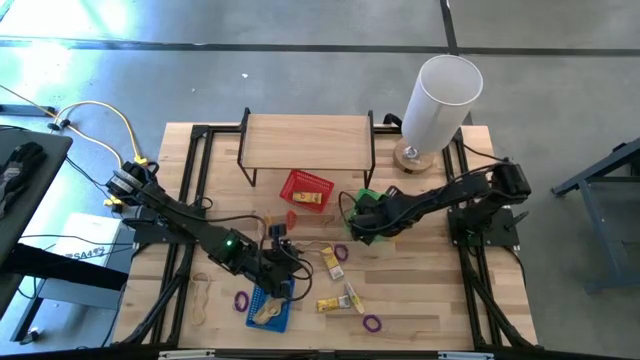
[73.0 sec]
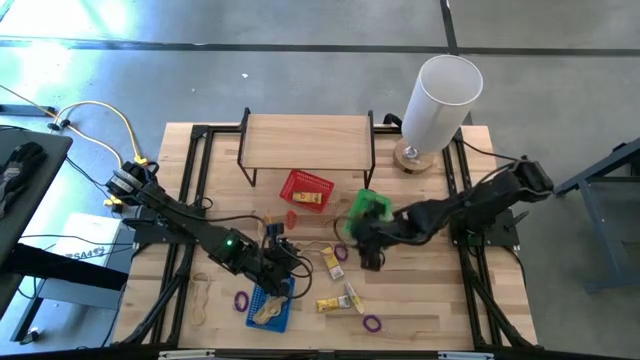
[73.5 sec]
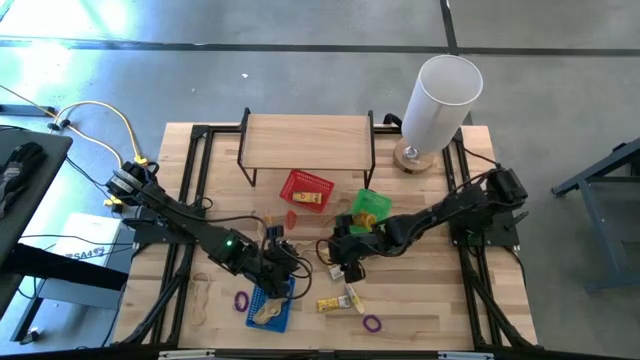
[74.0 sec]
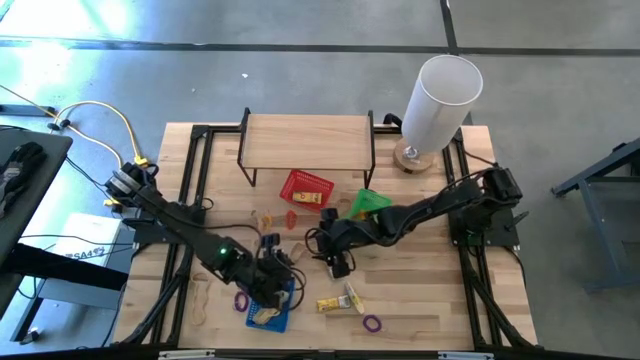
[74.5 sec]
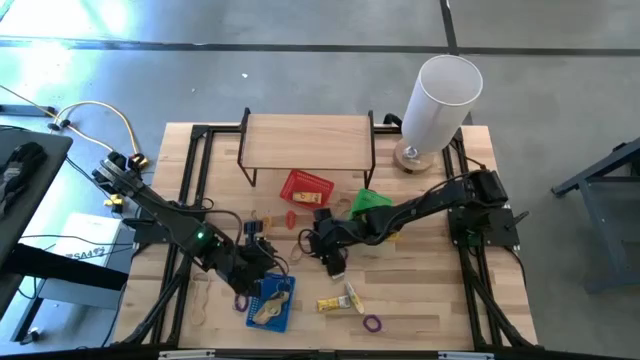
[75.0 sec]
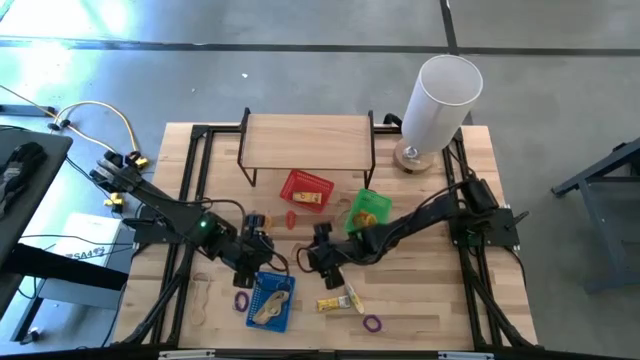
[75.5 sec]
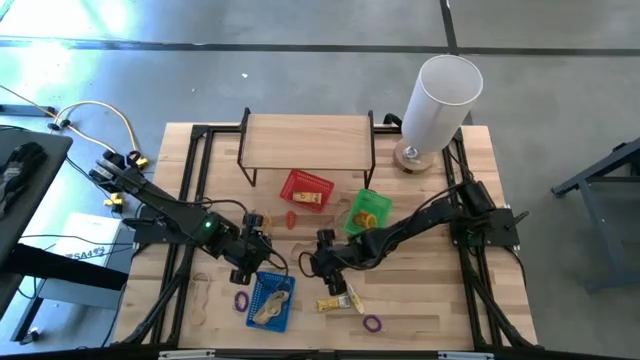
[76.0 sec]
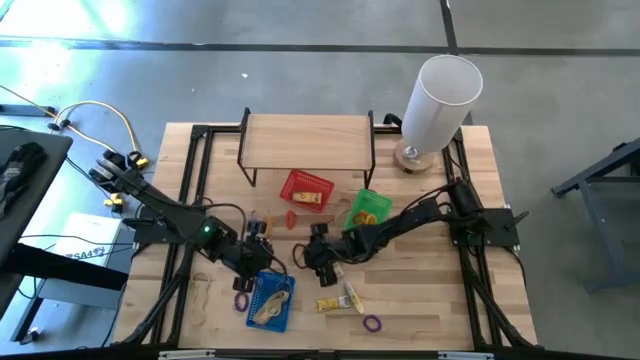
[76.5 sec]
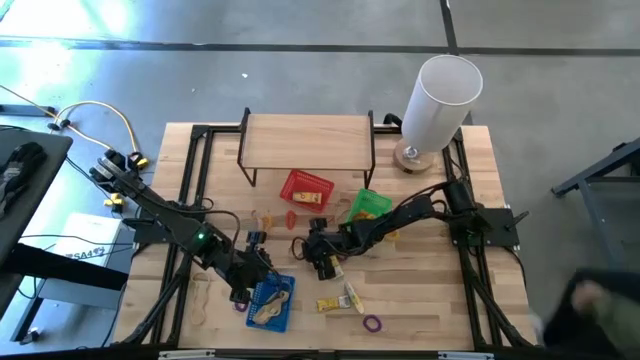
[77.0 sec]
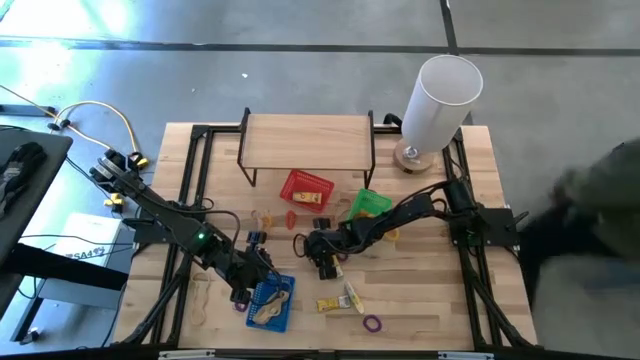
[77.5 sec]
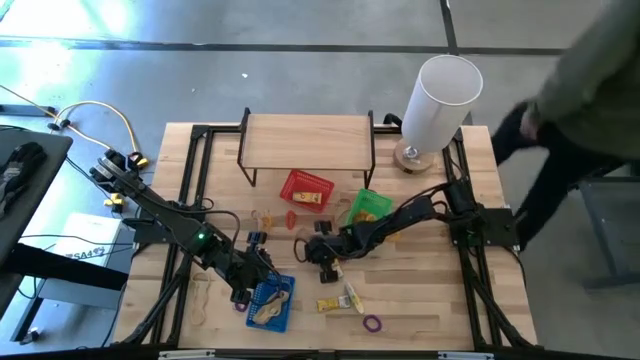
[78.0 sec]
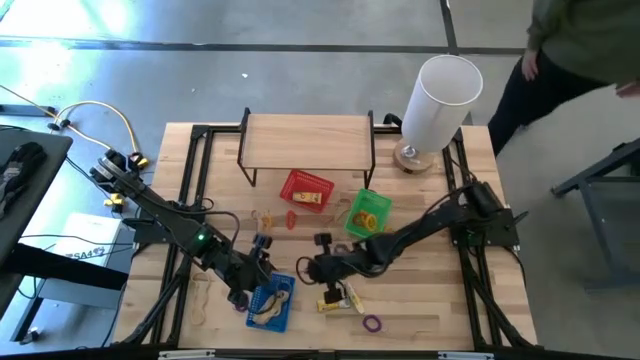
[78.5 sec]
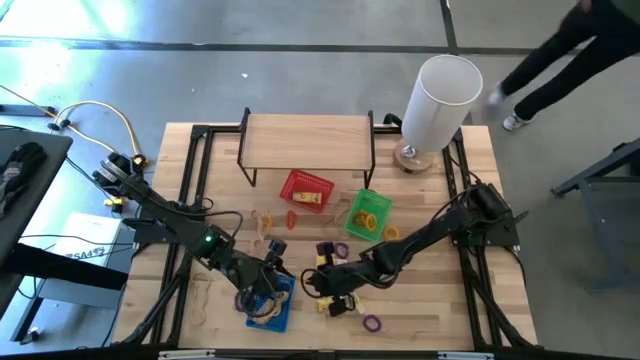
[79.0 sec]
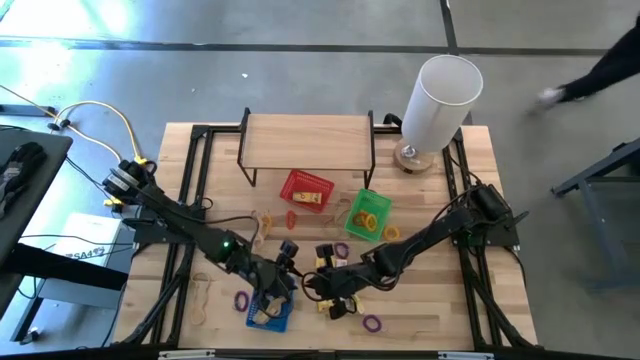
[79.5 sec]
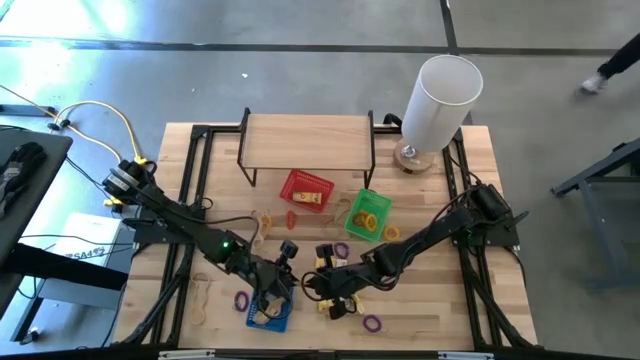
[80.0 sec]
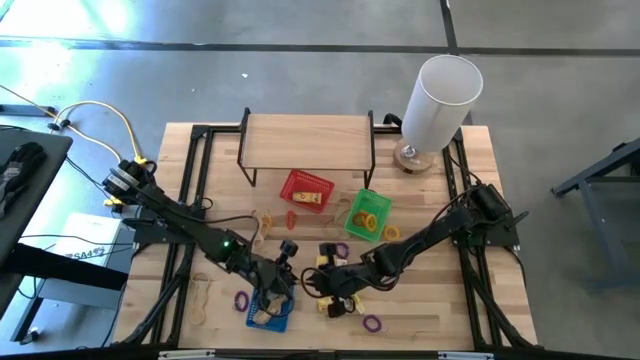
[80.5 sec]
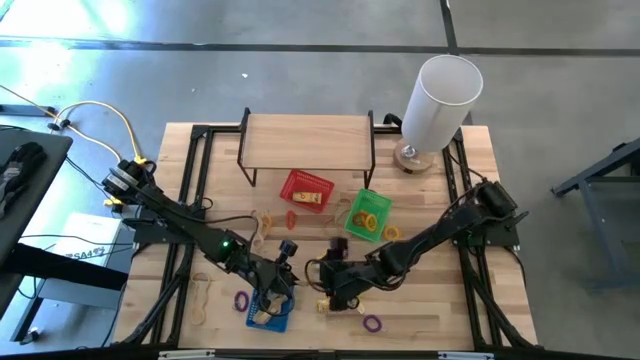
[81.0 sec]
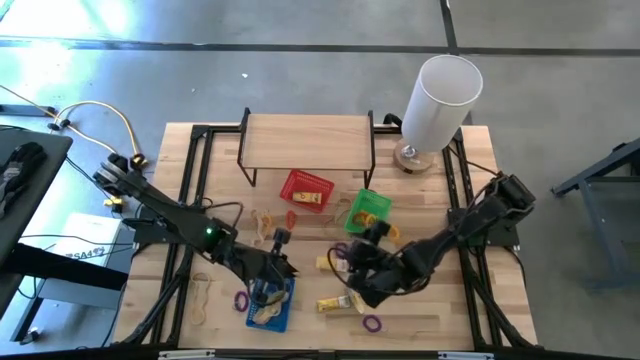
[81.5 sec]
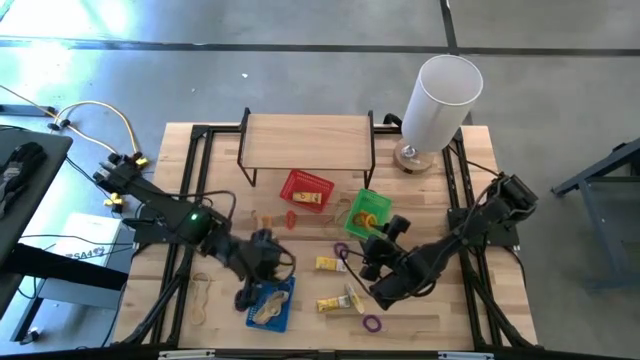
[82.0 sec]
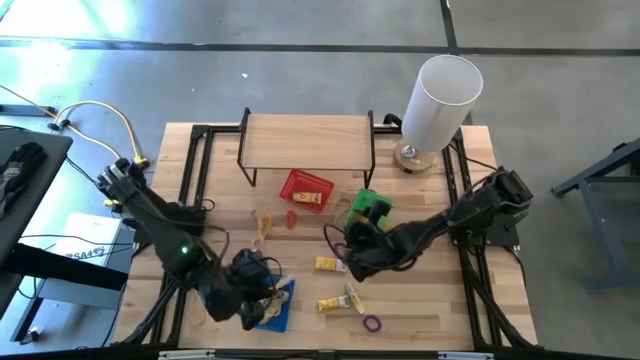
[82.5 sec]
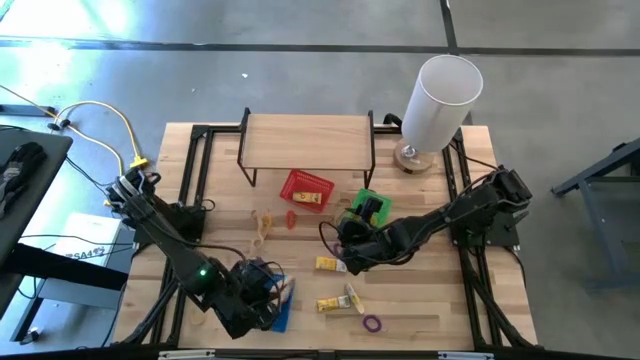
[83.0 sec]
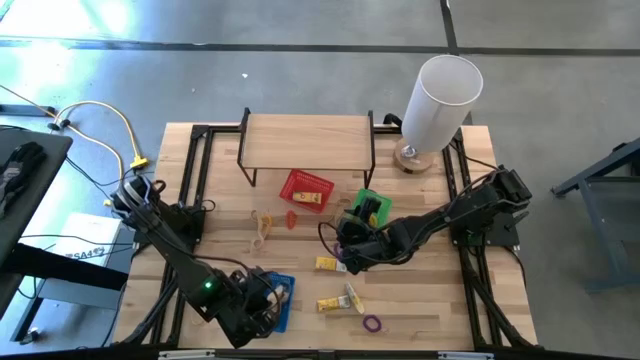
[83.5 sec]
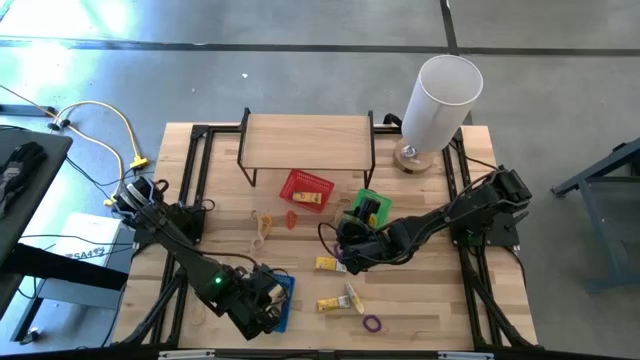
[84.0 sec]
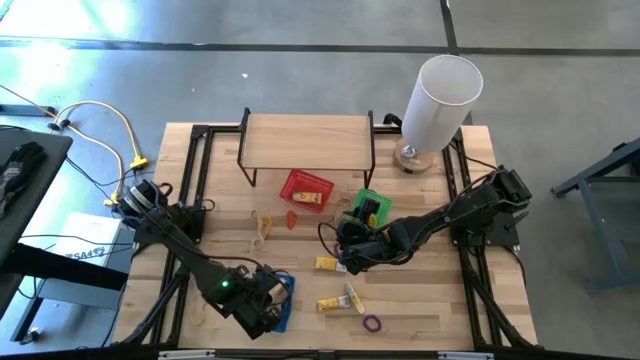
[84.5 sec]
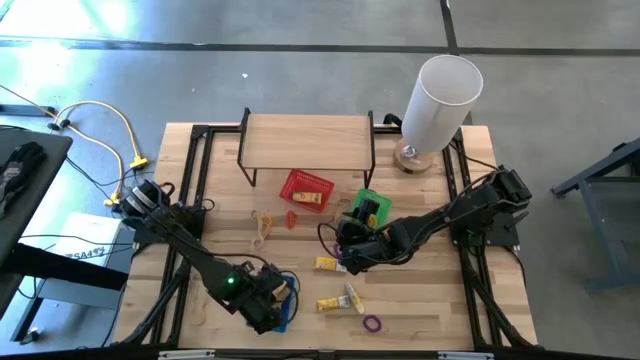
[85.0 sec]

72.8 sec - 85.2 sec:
Task: Pick & Place Office Desk Supplies
Put the brown rubber band into the blue bin

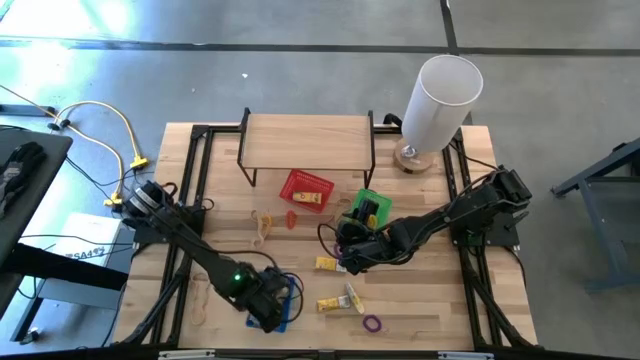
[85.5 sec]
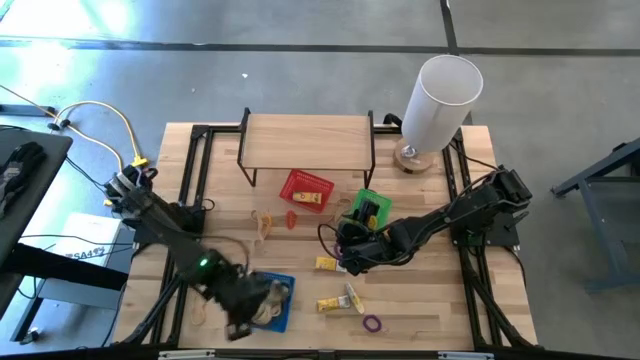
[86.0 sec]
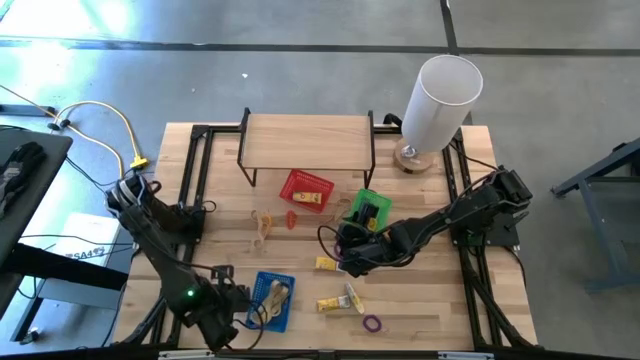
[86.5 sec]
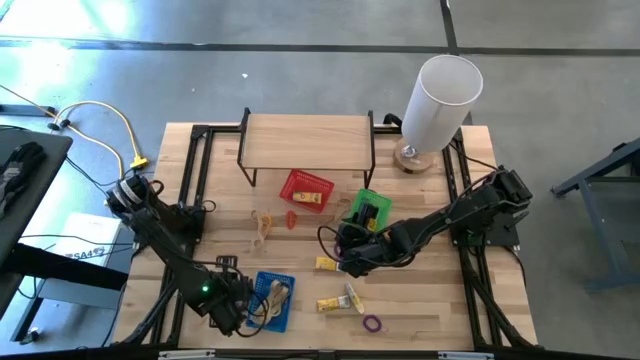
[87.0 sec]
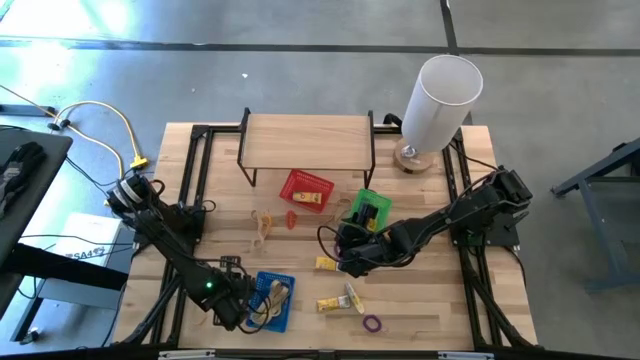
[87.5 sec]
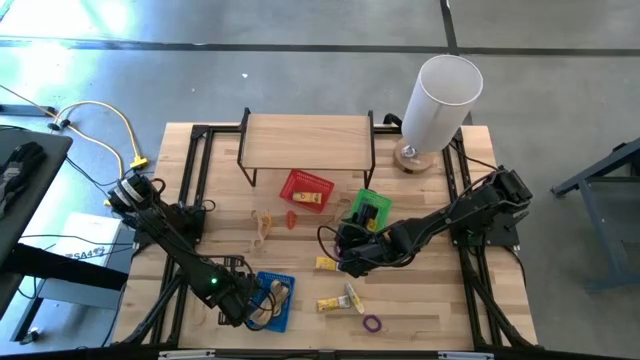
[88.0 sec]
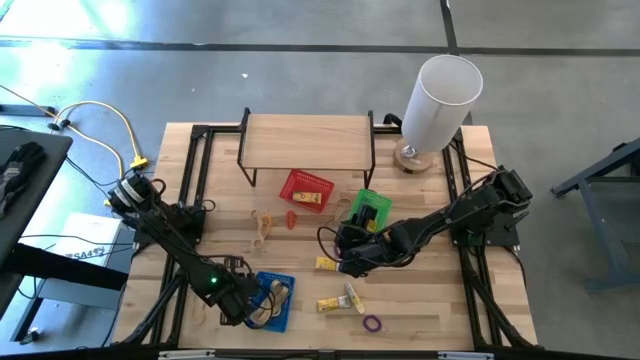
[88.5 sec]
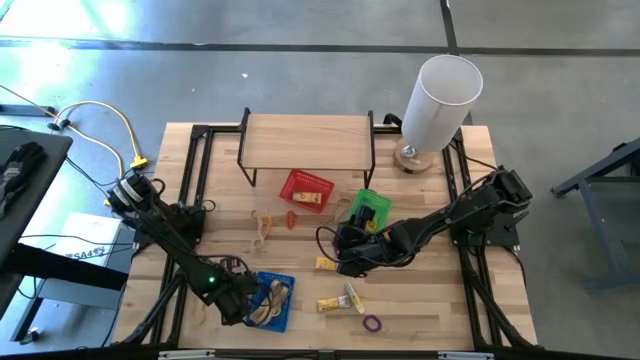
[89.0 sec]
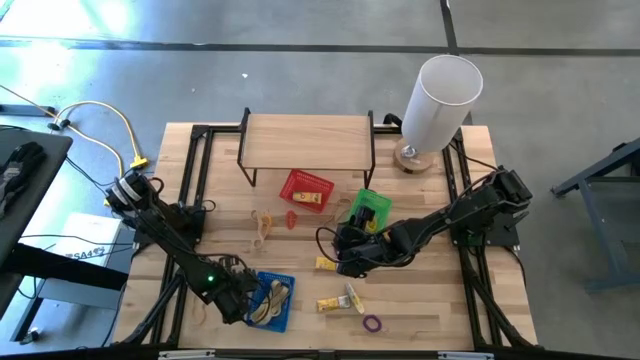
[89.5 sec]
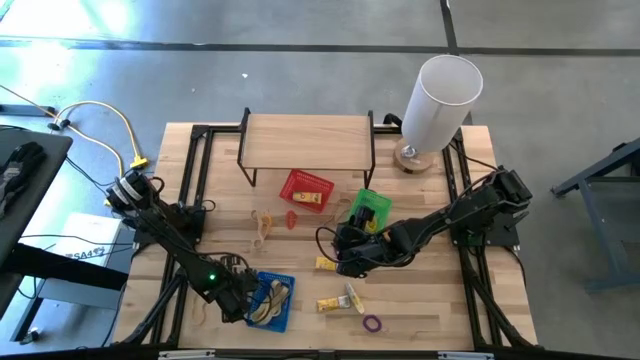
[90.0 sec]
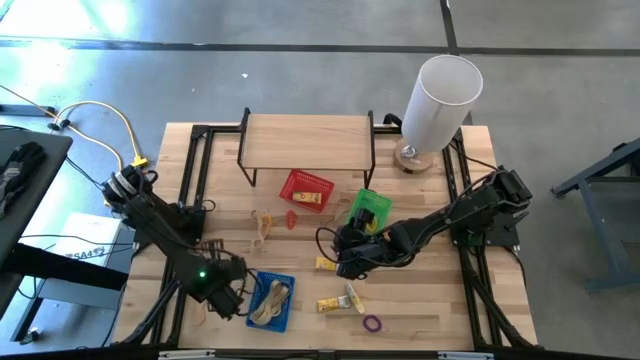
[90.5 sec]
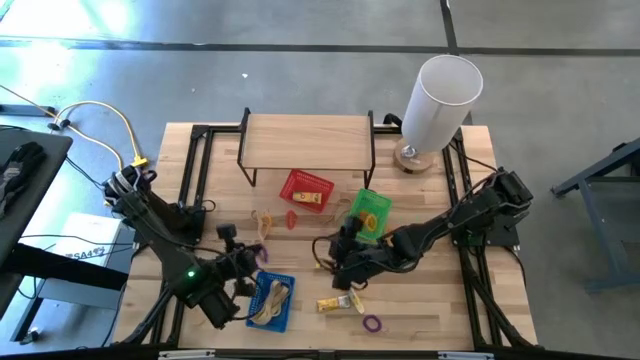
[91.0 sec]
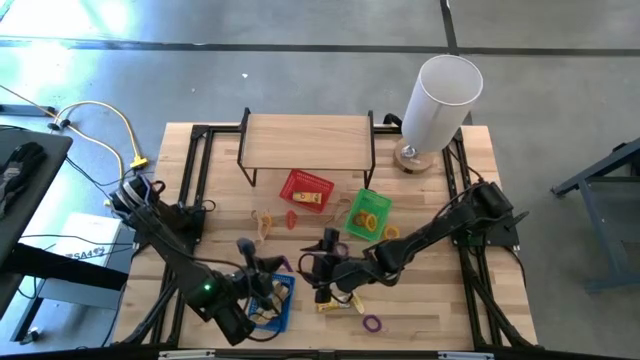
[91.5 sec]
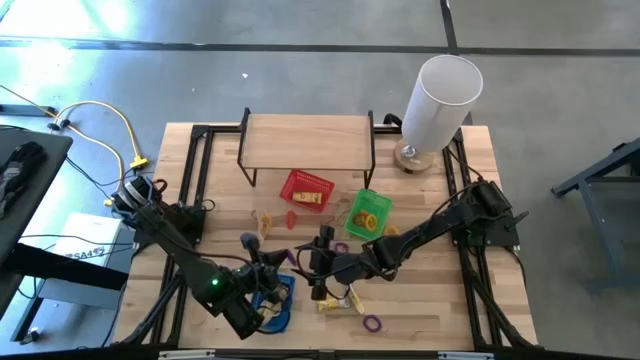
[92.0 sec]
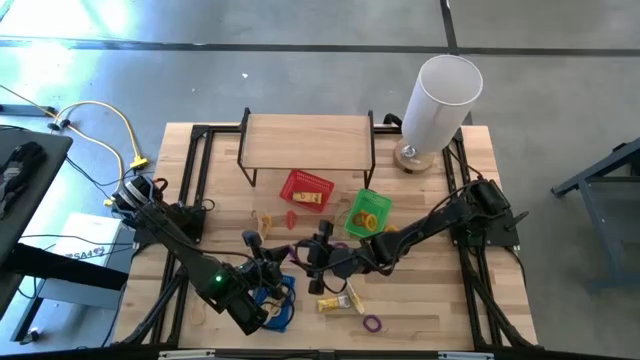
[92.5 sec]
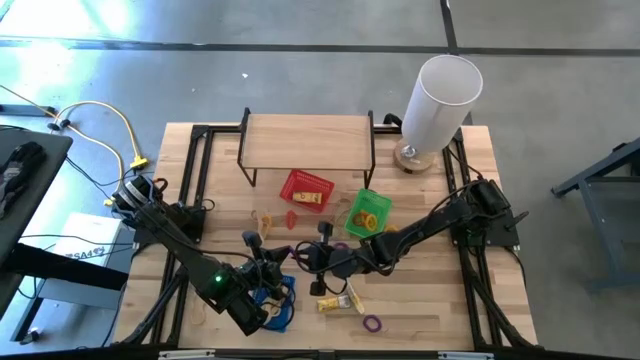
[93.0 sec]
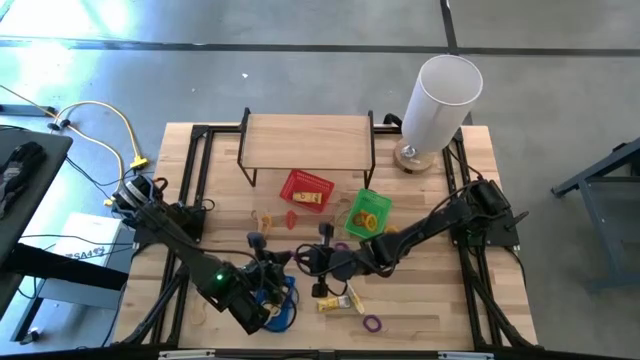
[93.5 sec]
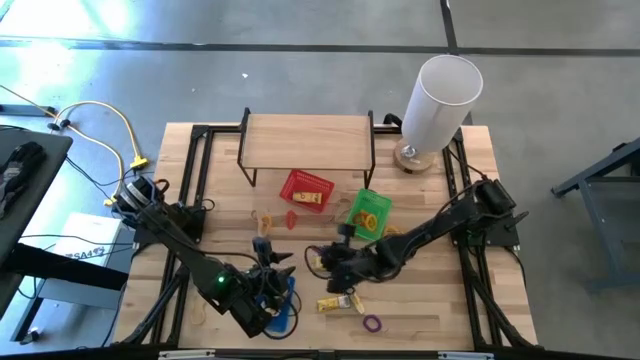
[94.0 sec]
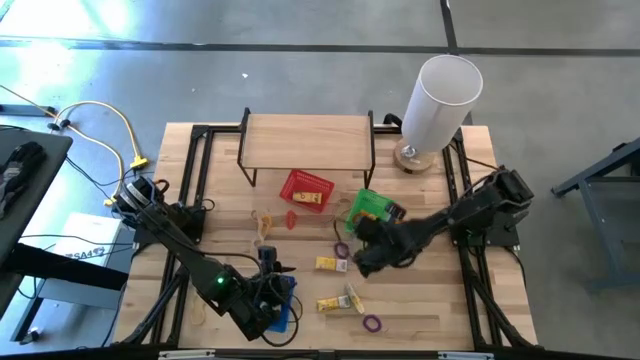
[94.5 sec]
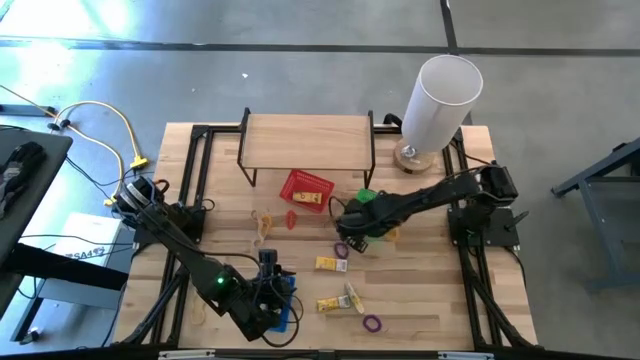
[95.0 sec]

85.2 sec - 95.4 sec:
Put the violet spring keychain into the green bin
